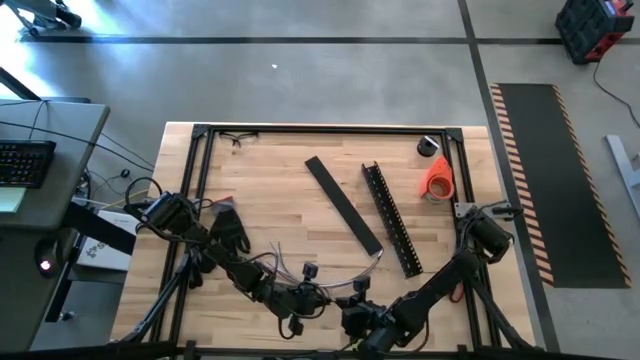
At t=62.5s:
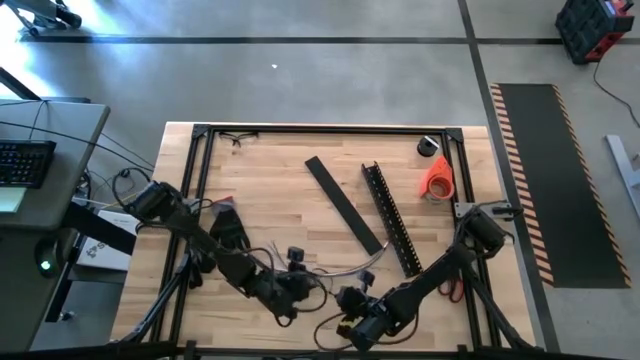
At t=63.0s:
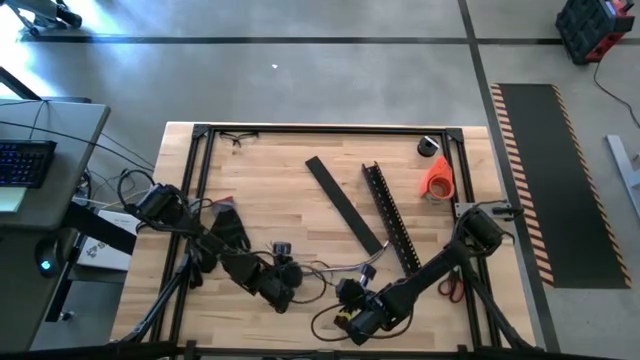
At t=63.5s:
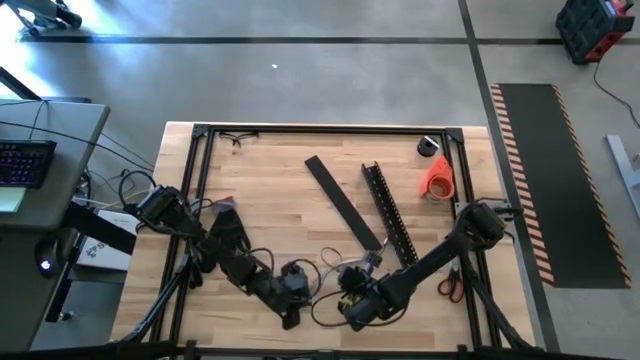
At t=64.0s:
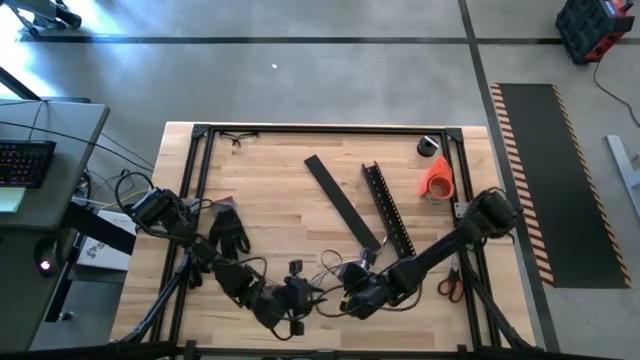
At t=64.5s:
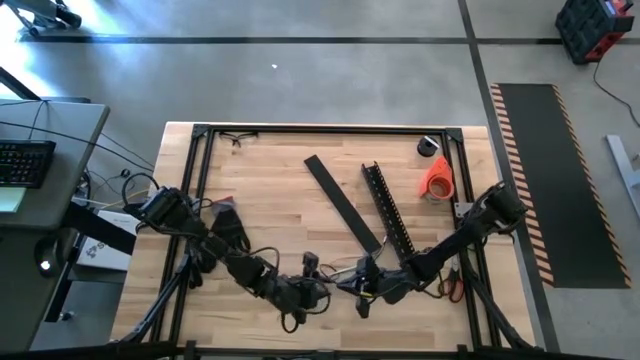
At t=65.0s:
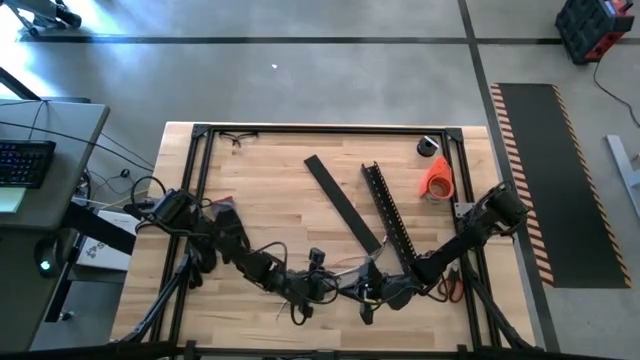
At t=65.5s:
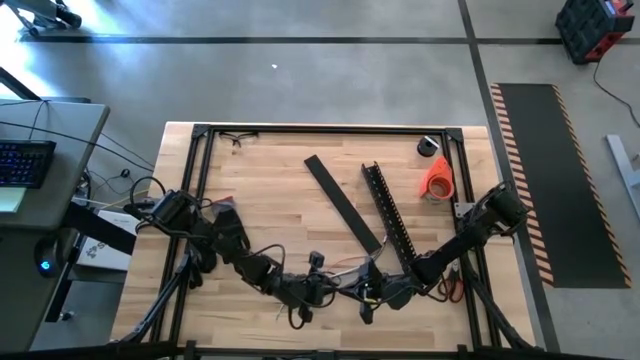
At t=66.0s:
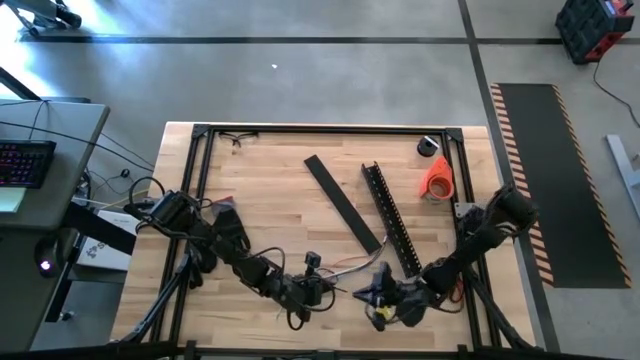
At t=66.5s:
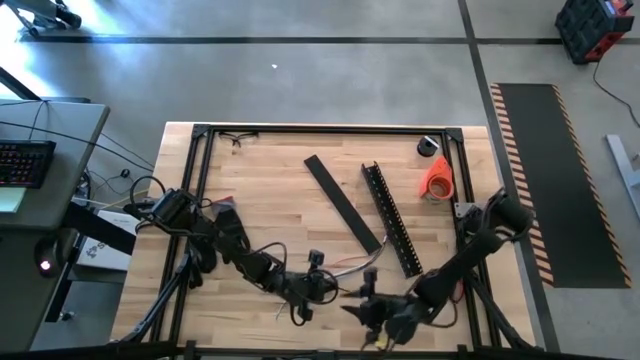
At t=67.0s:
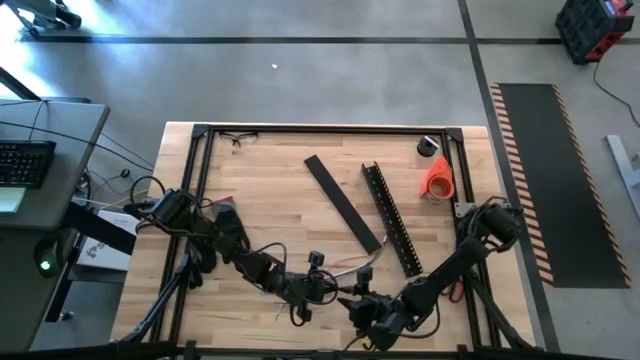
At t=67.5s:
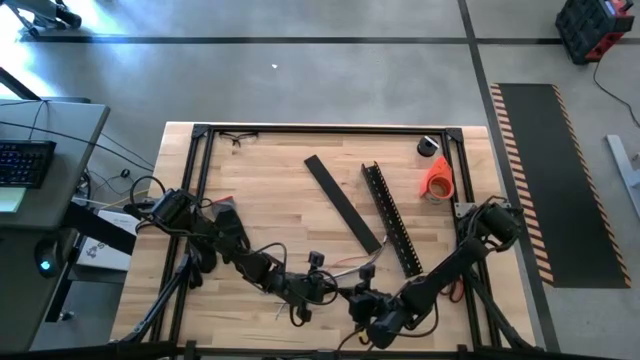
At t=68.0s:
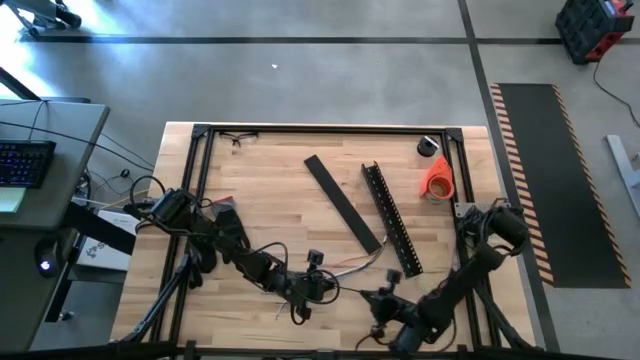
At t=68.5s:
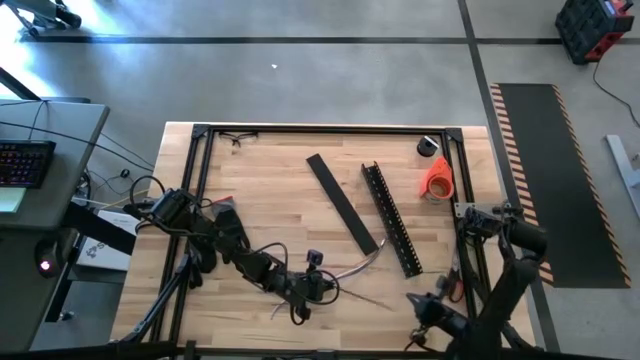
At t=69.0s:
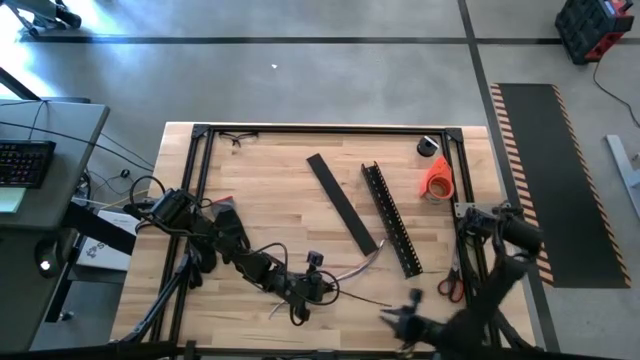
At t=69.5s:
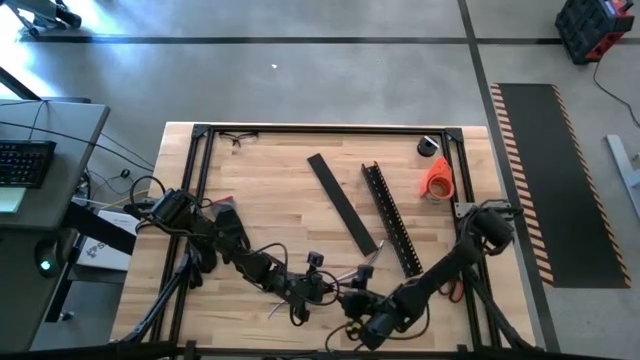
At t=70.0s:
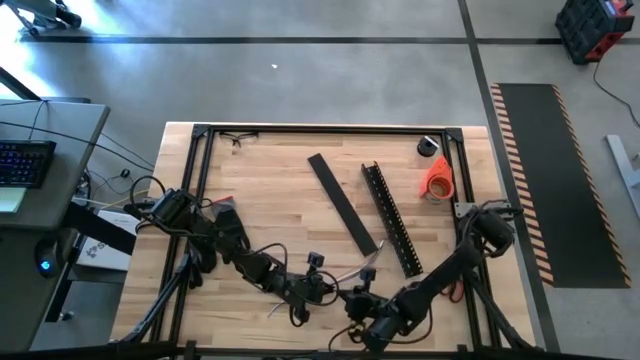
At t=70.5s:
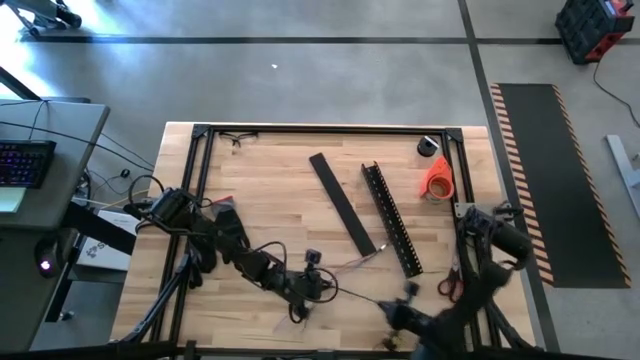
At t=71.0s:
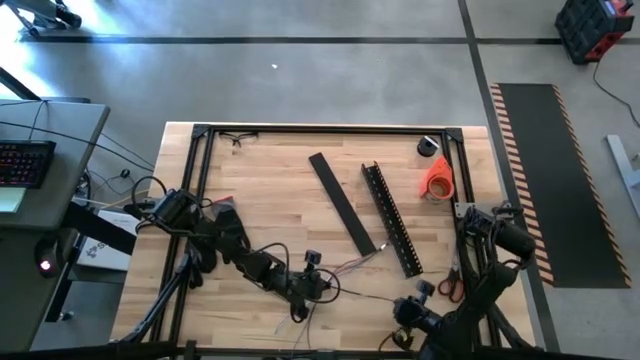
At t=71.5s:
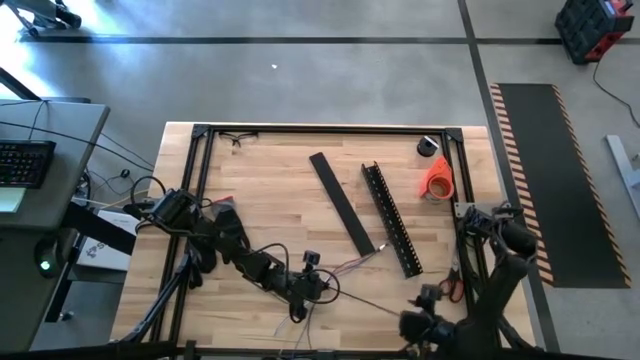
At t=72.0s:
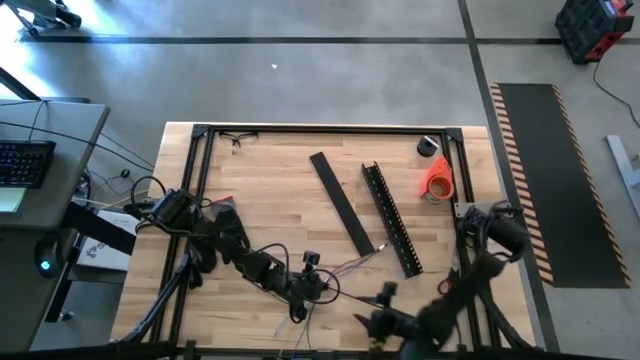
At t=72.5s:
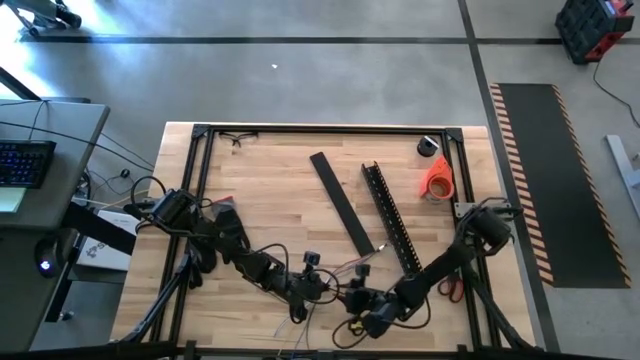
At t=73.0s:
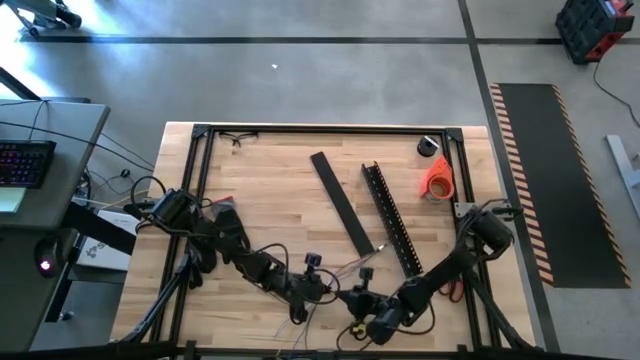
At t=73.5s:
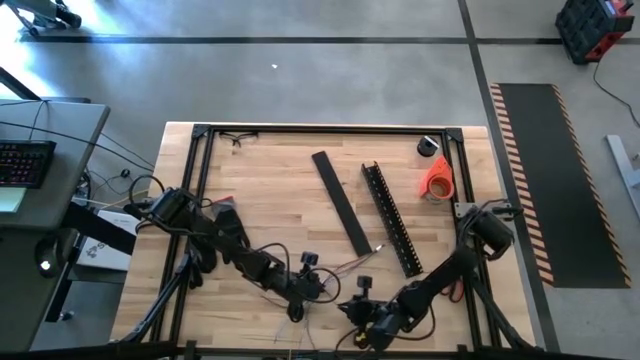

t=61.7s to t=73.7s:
Task: Ziptie cables
Wrap the black zip tie on the cables

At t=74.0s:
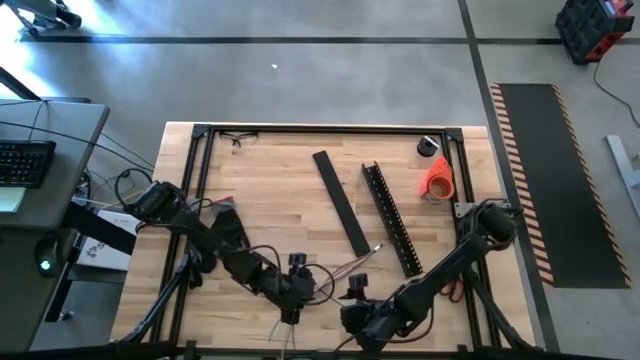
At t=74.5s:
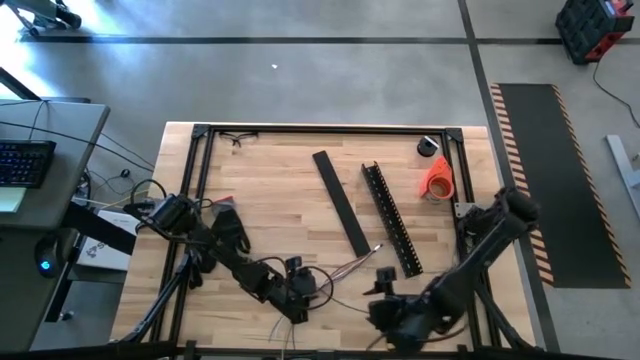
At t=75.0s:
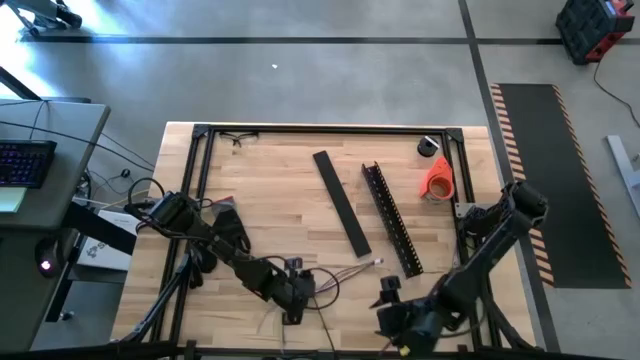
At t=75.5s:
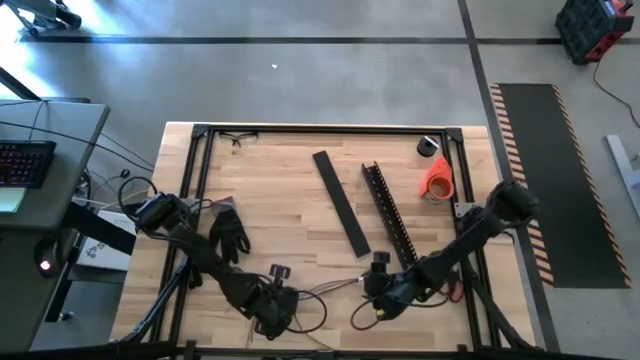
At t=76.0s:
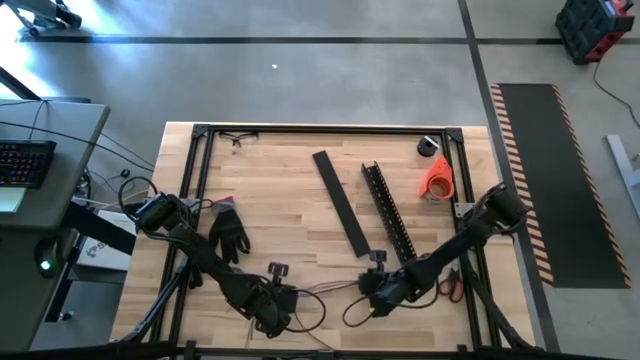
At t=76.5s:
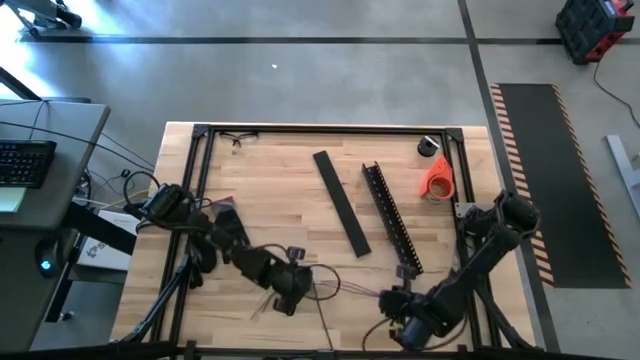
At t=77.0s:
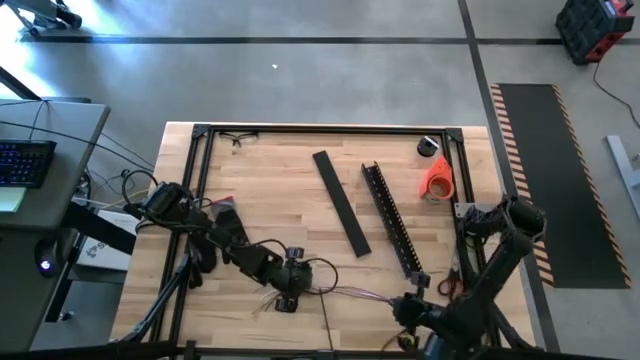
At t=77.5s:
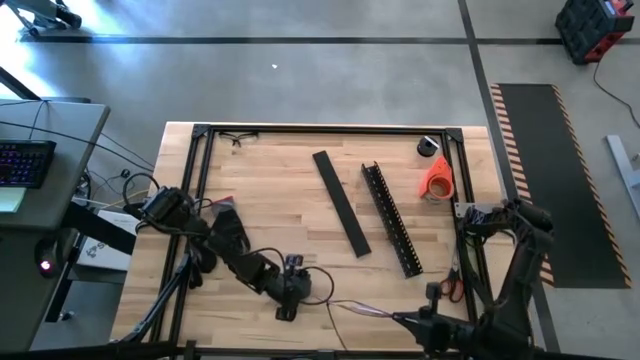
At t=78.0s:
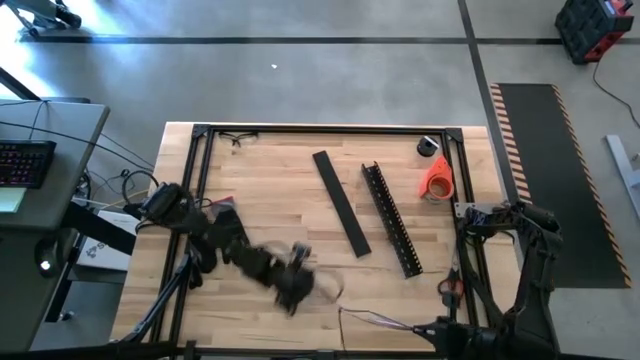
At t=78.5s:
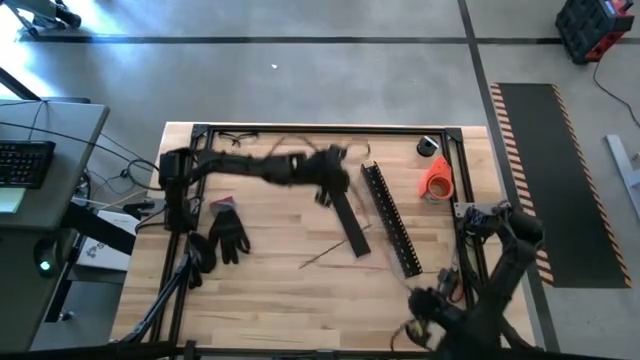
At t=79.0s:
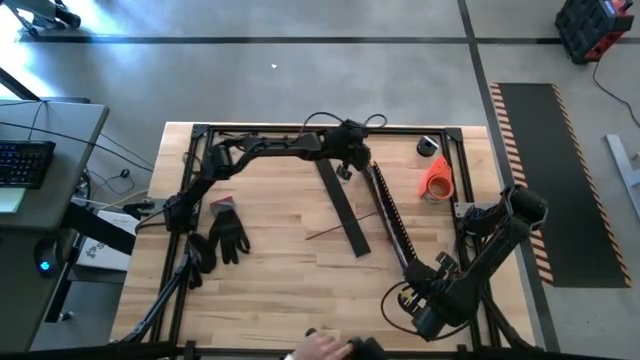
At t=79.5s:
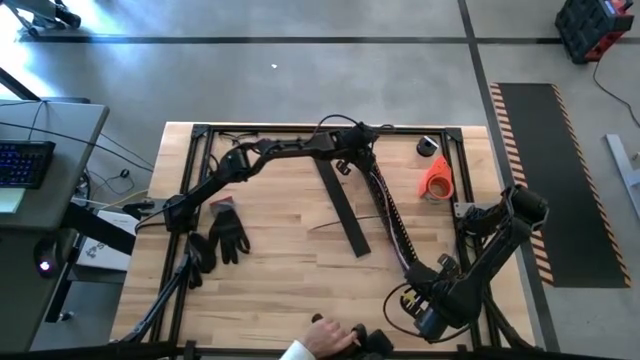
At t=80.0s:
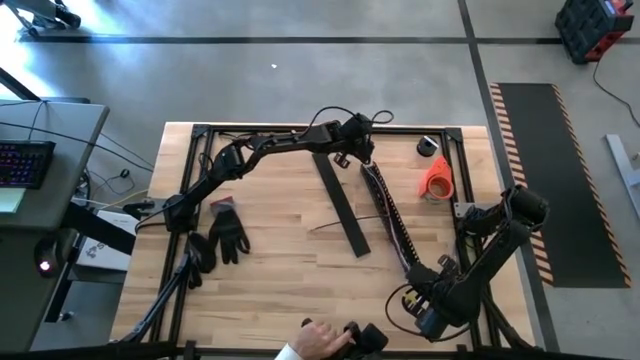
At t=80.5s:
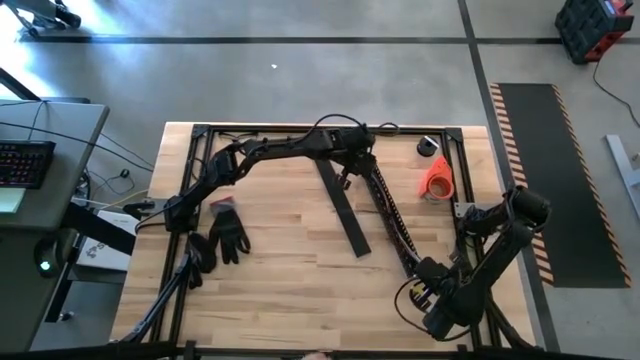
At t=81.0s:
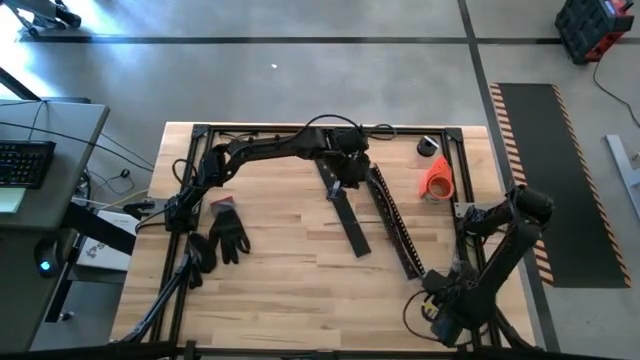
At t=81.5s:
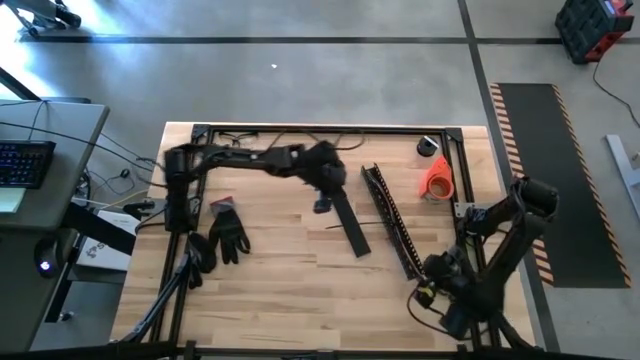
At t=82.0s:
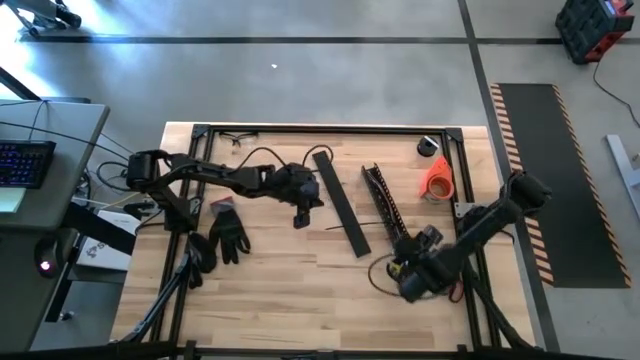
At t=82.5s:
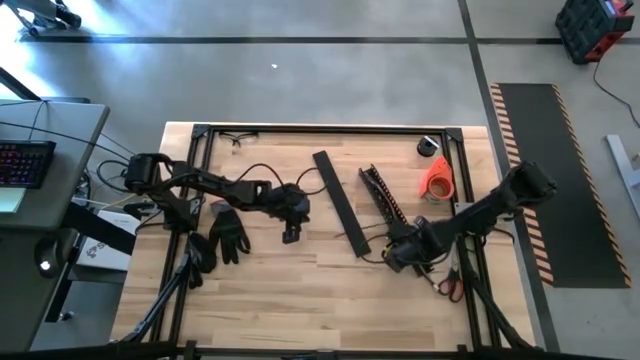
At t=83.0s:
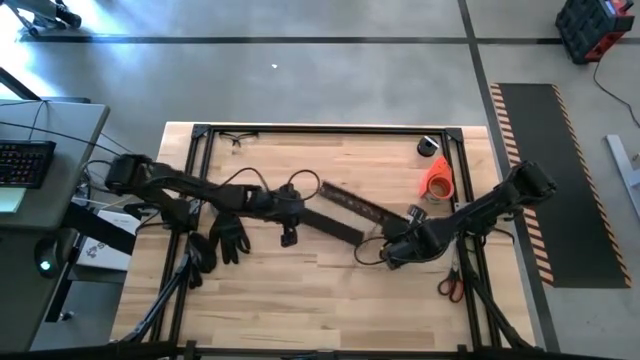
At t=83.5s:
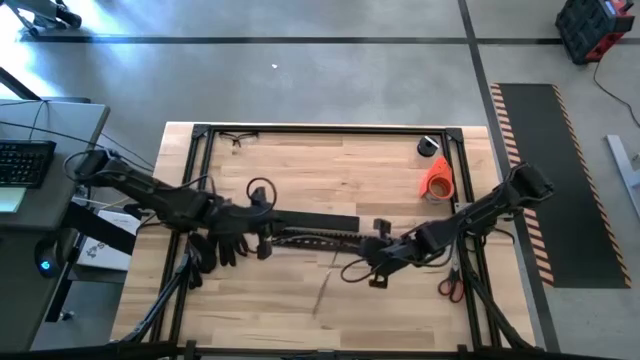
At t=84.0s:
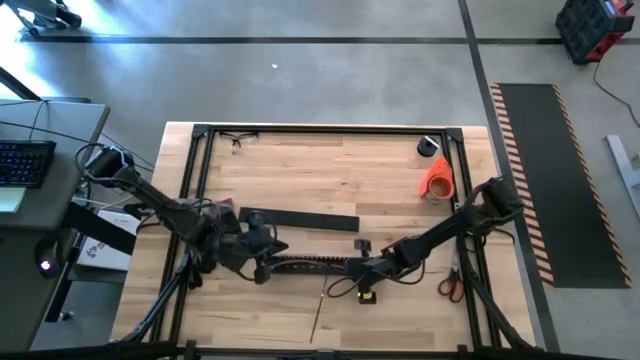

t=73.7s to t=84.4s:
Put the zip tied cables into the black cable duct
